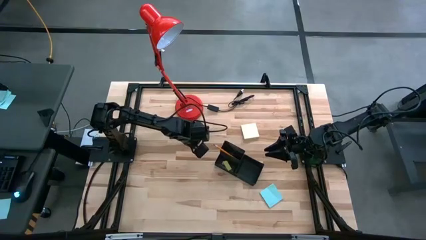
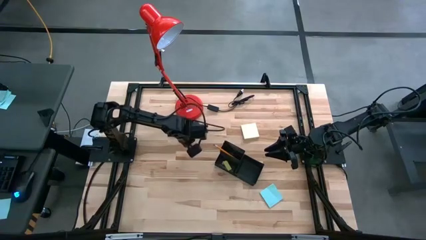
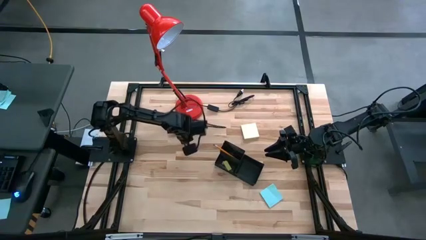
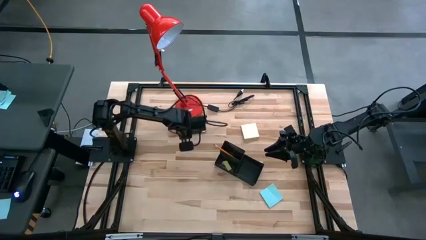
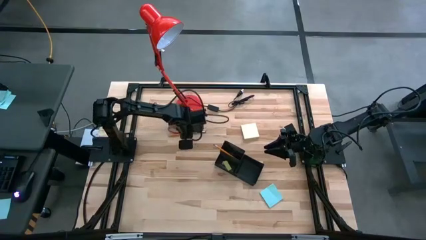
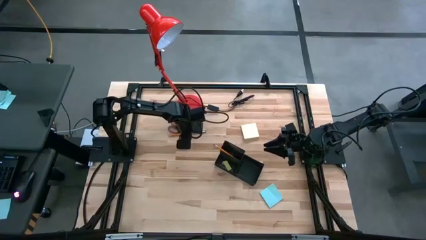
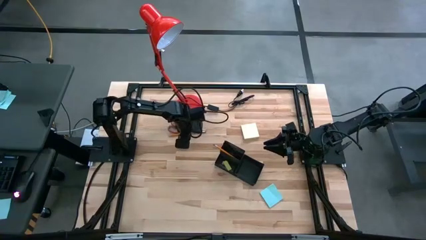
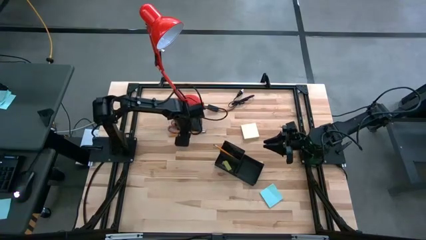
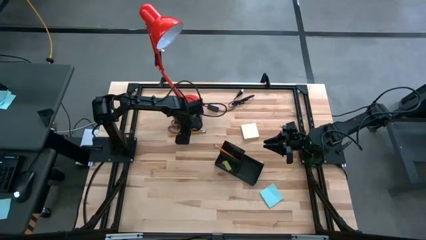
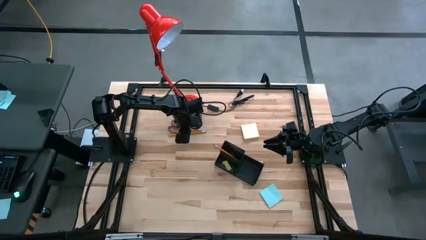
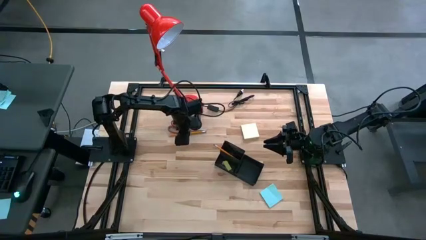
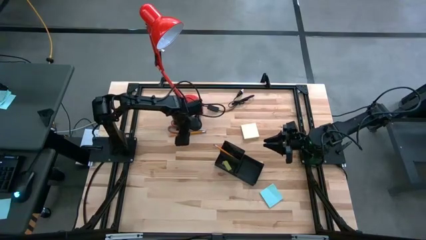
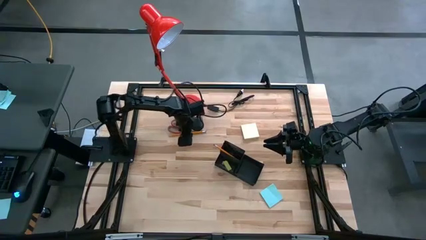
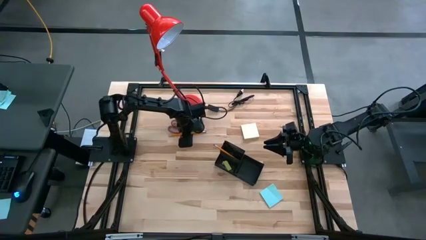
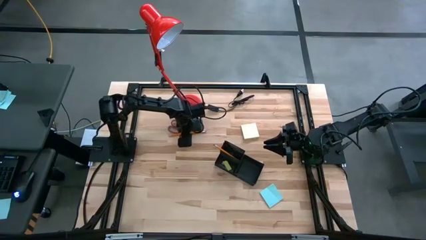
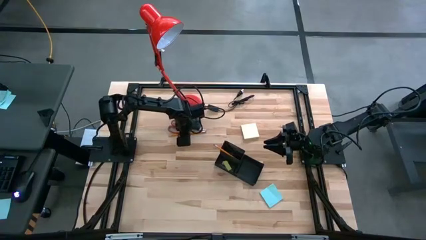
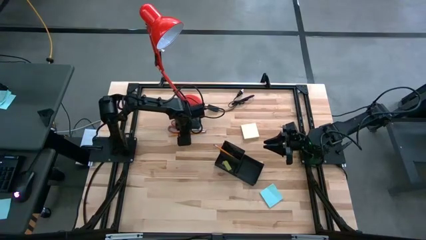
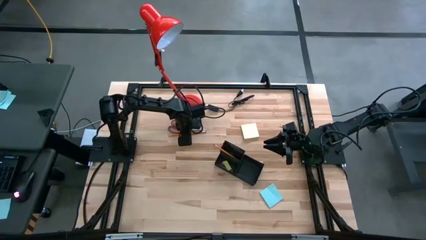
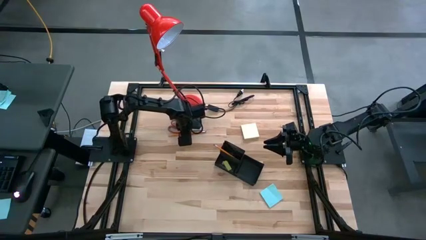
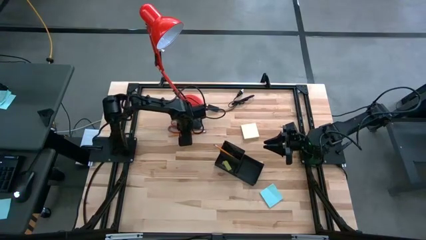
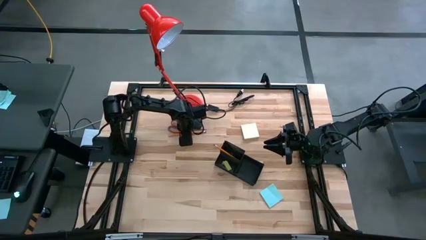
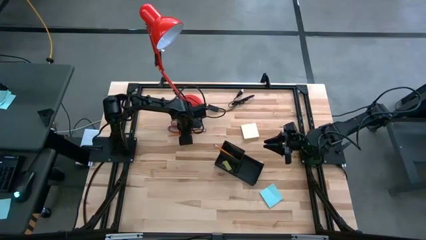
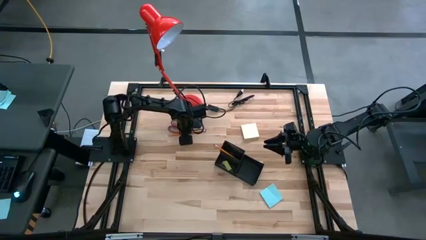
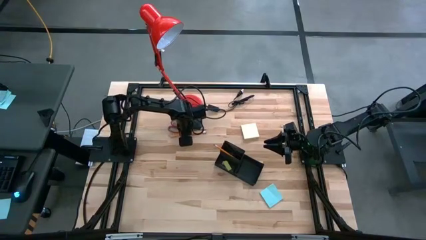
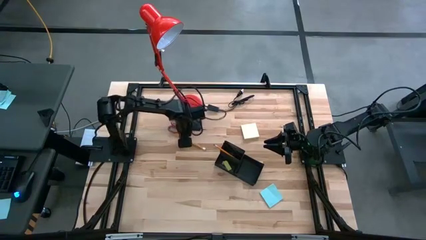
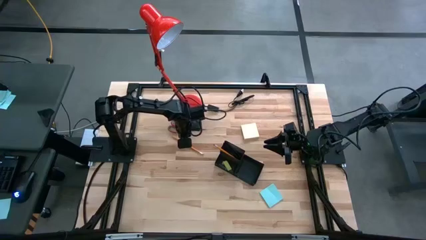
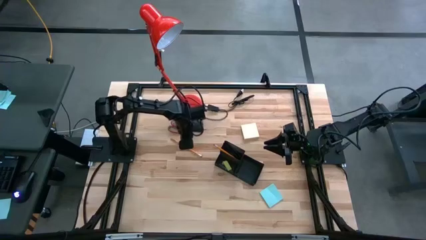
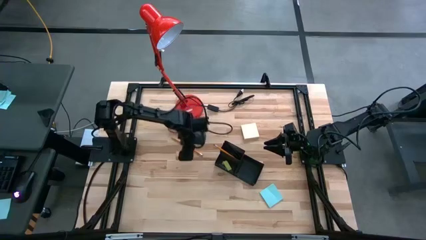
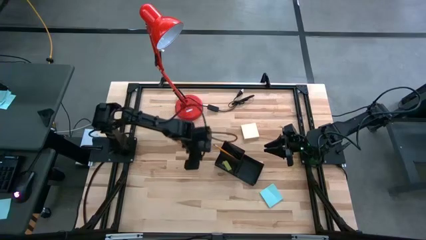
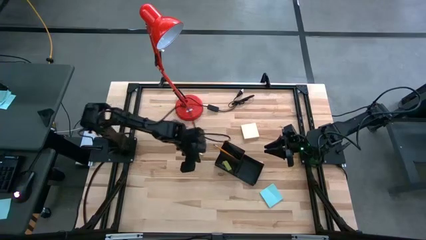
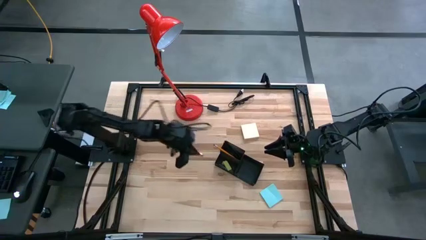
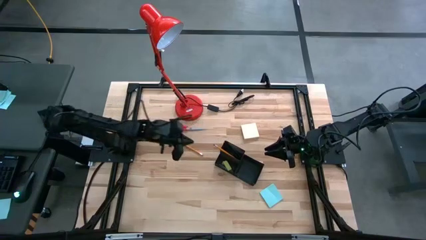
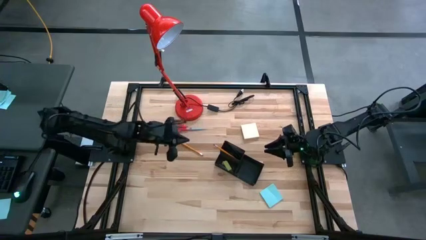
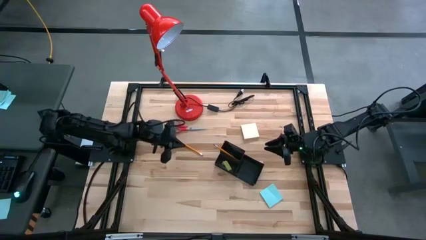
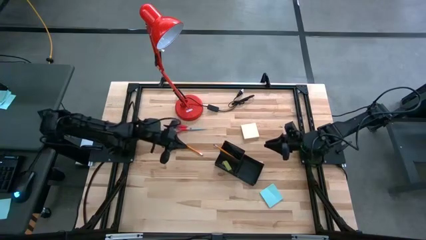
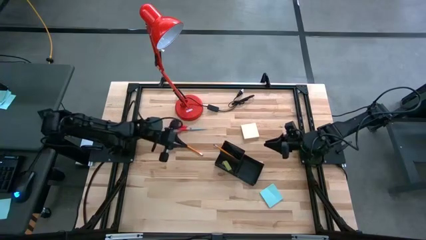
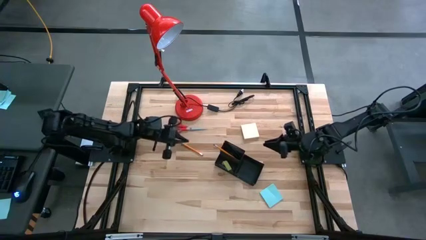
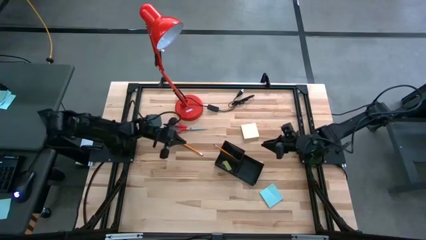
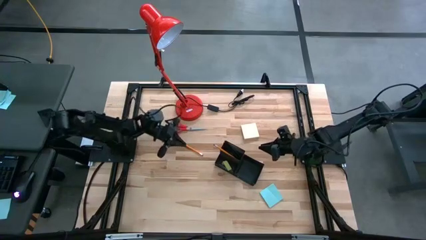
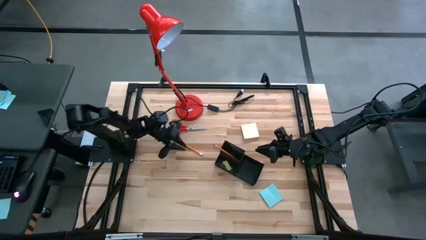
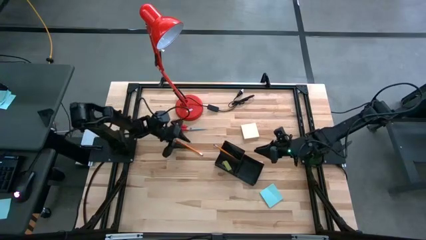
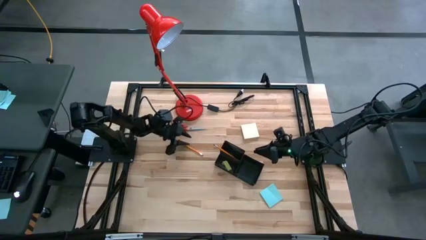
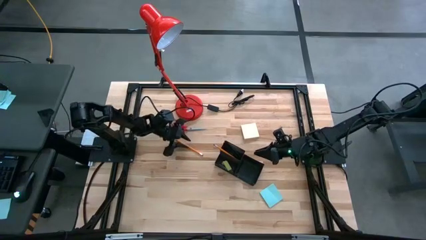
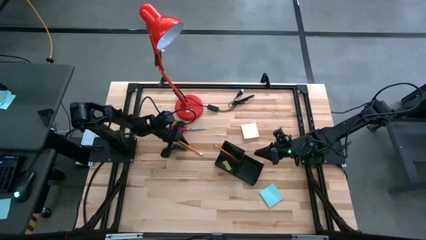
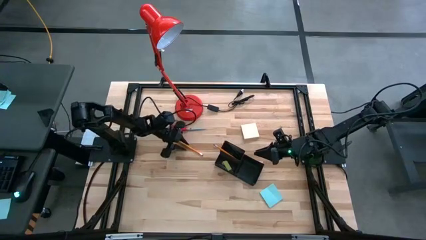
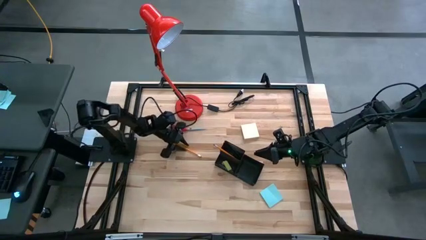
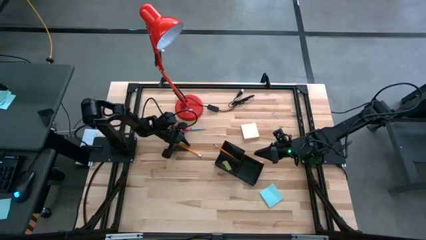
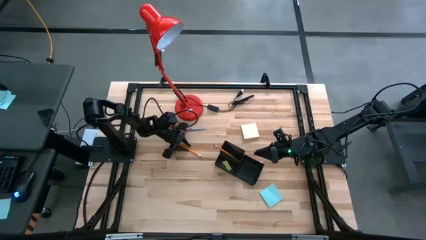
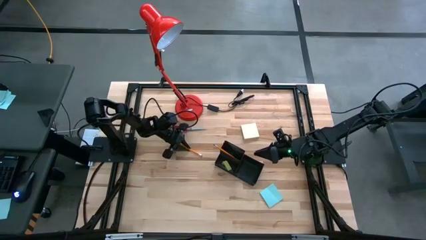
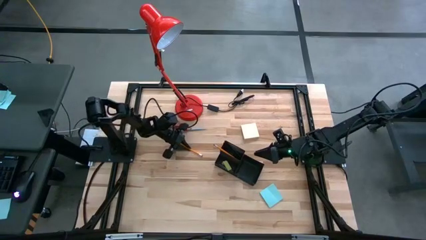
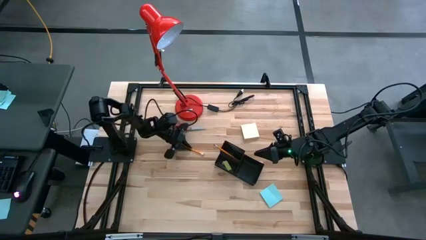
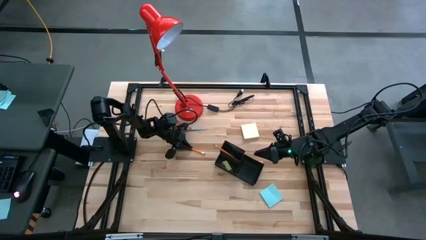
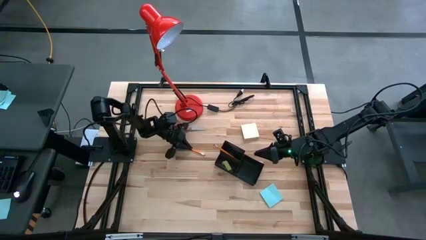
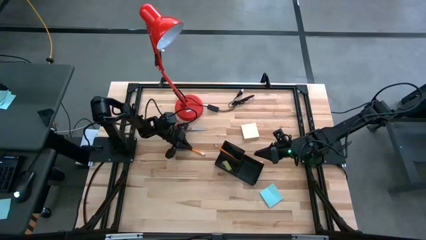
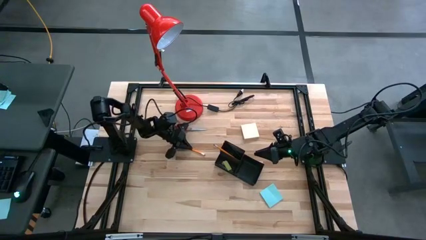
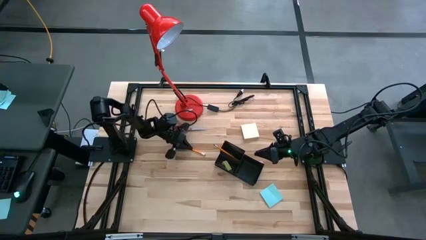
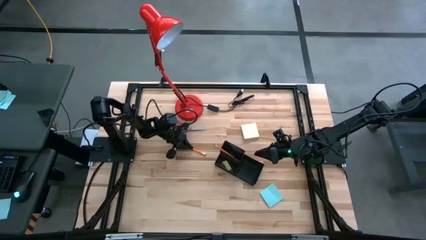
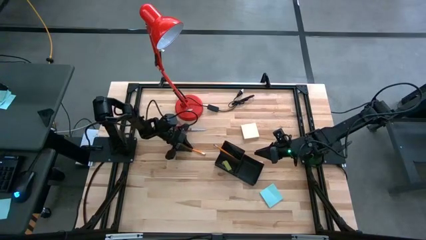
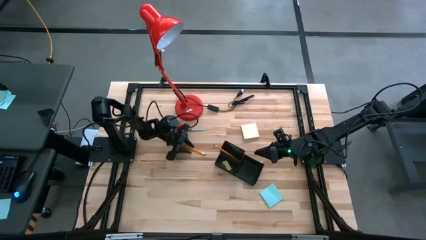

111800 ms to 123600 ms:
Task: Pick and place office supplies into organizer
Put the orange pencil into the black desk organizer

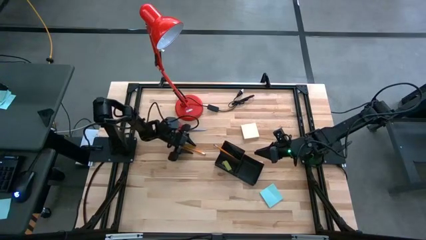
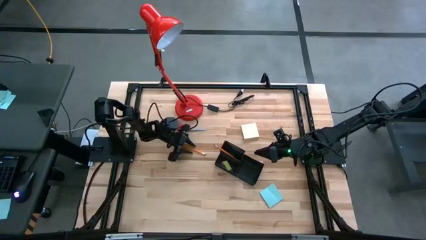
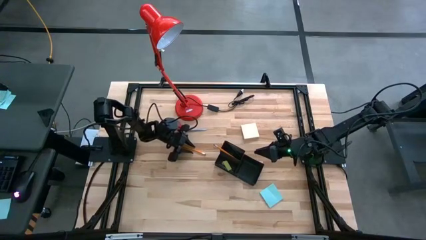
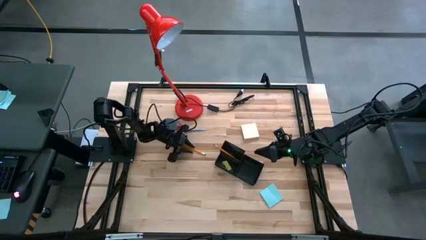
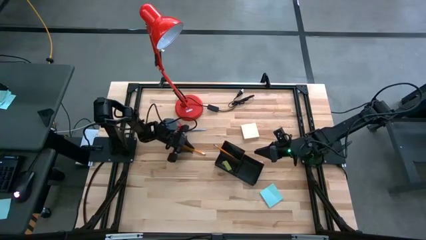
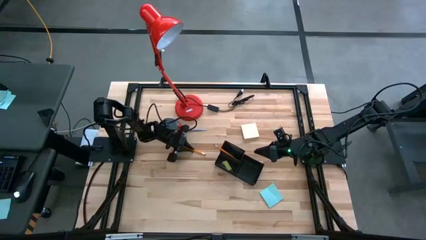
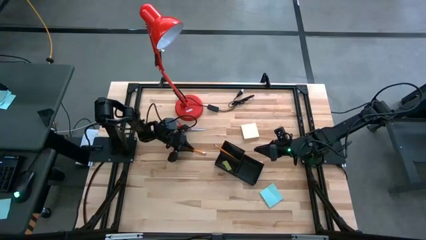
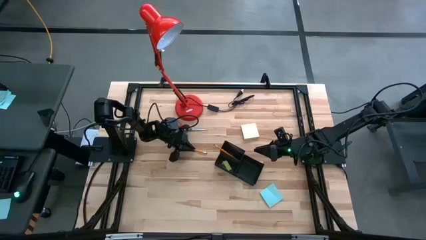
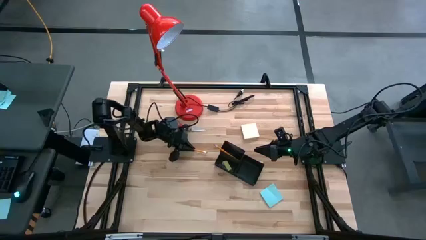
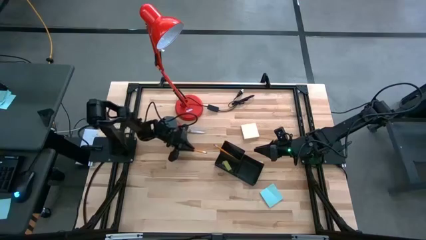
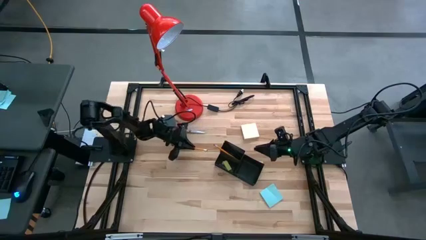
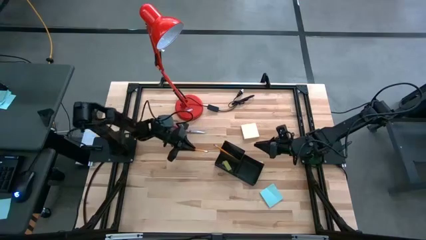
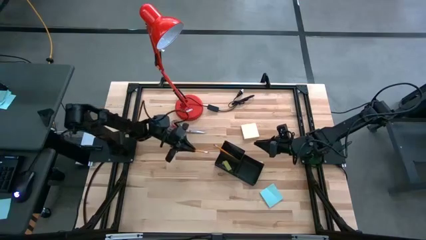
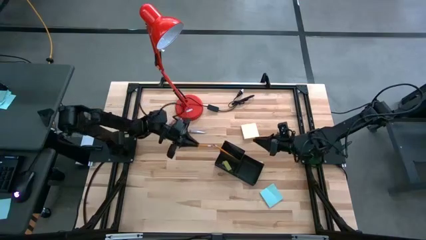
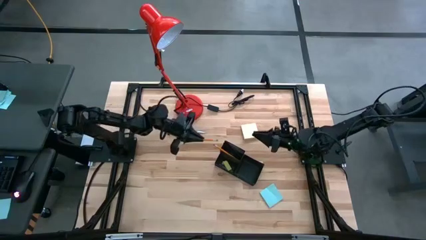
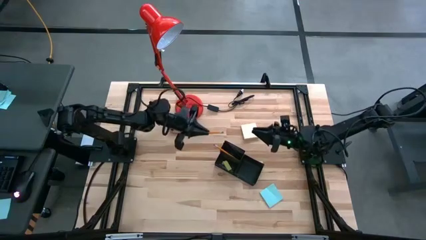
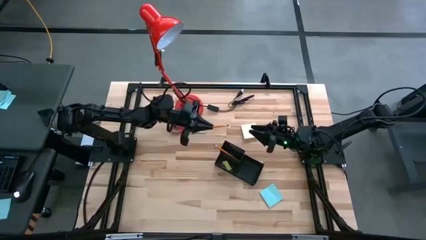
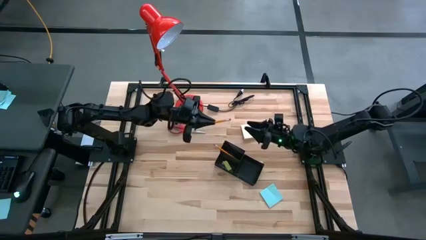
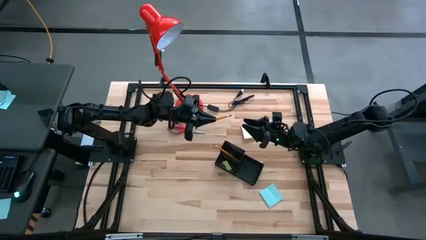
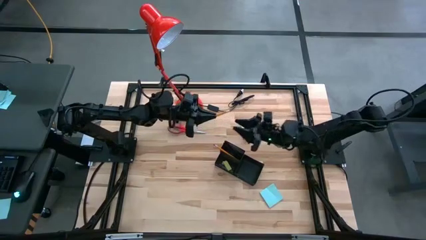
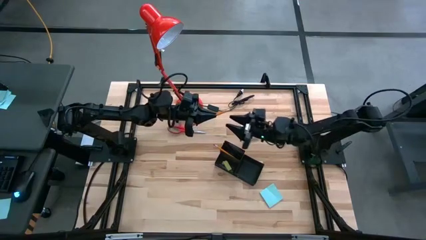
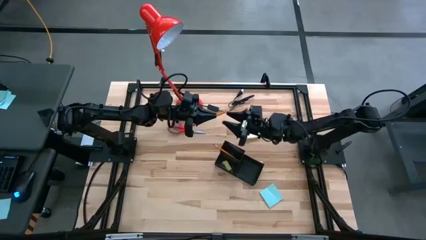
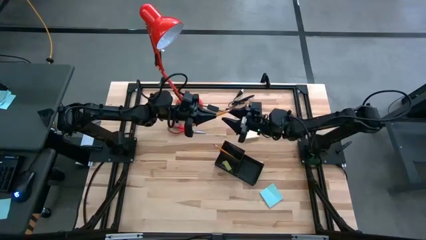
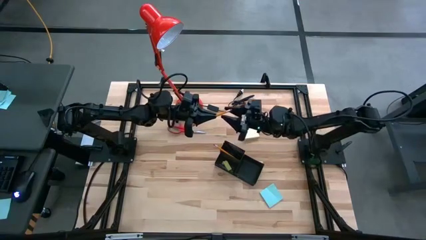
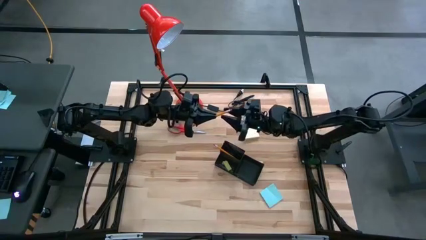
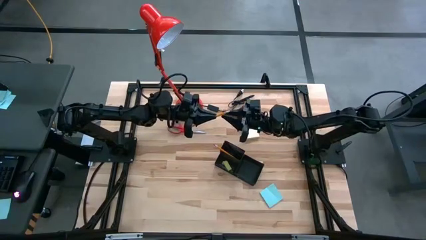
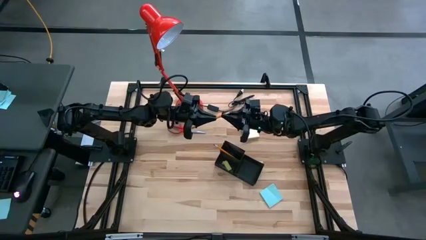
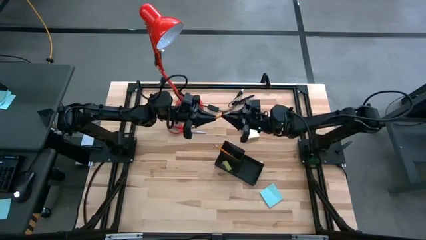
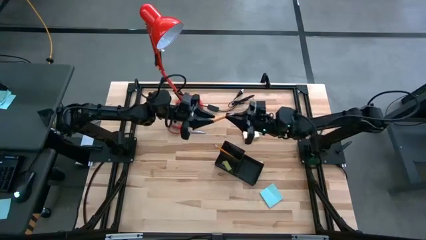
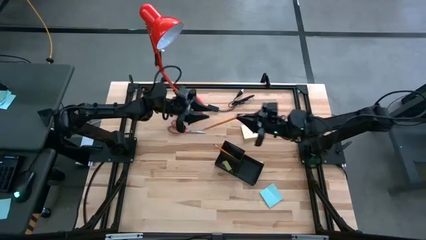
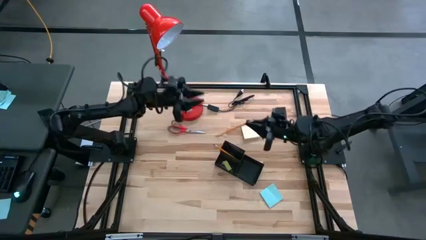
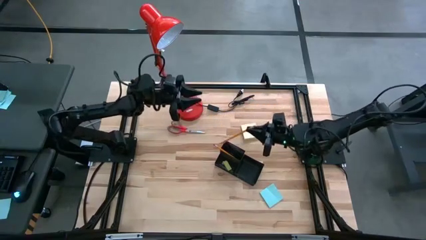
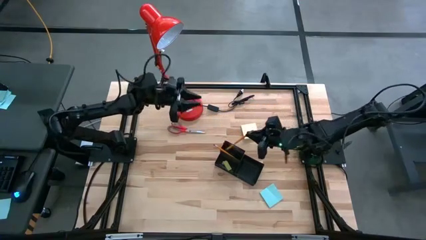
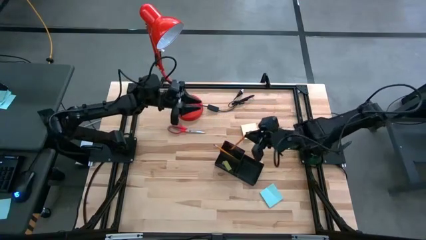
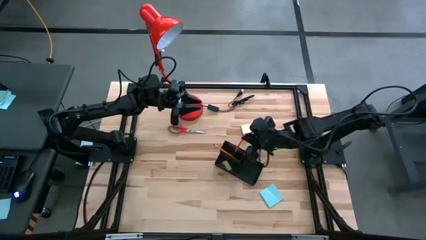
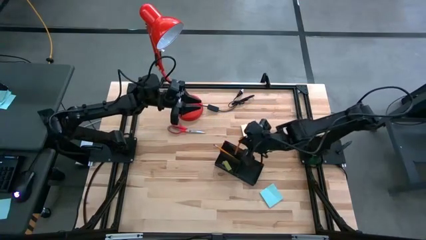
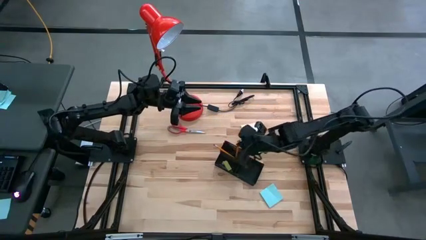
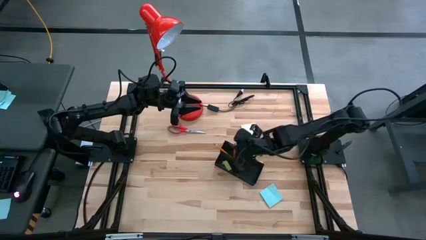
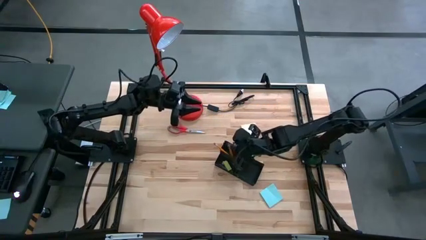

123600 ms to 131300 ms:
Put the orange pencil into the black desk organizer
